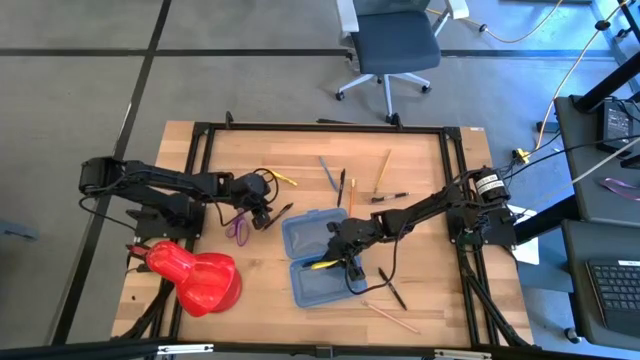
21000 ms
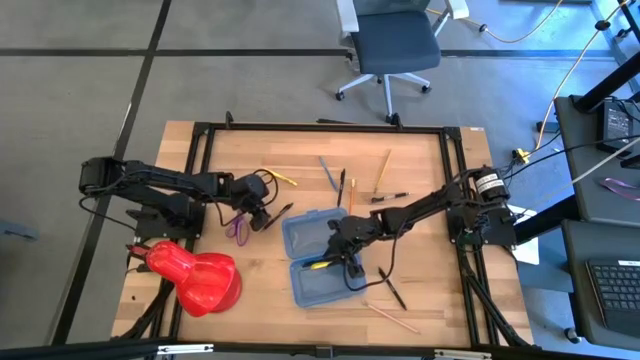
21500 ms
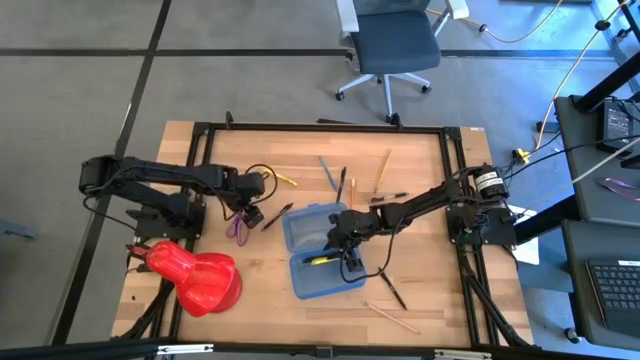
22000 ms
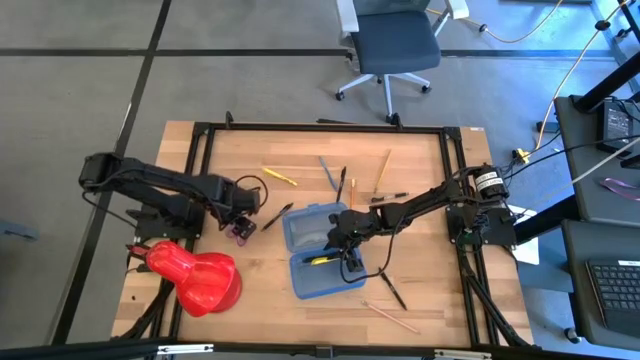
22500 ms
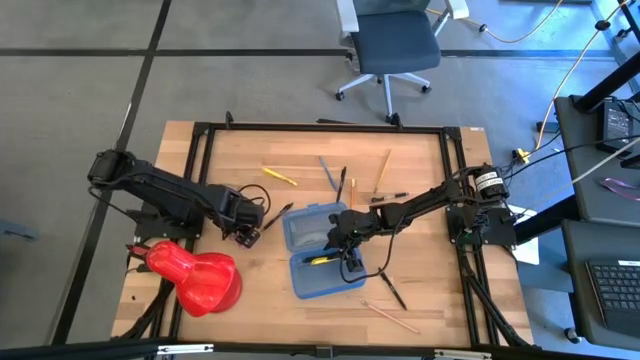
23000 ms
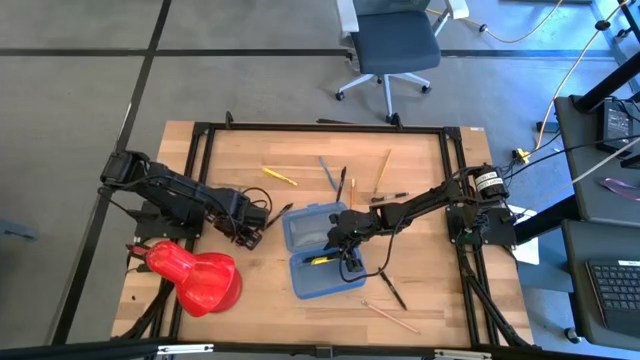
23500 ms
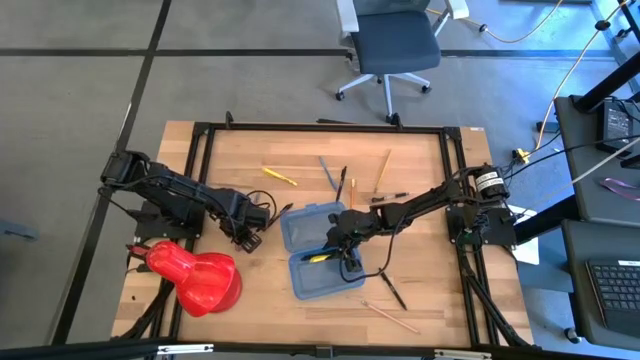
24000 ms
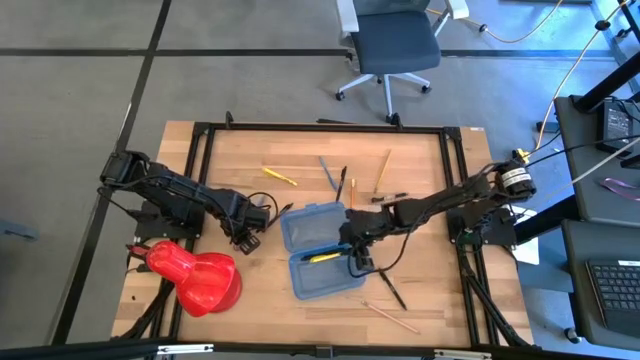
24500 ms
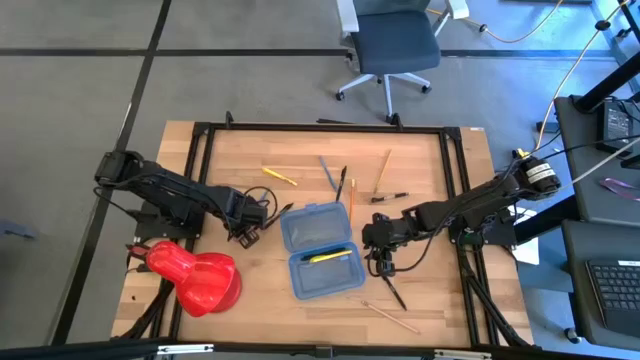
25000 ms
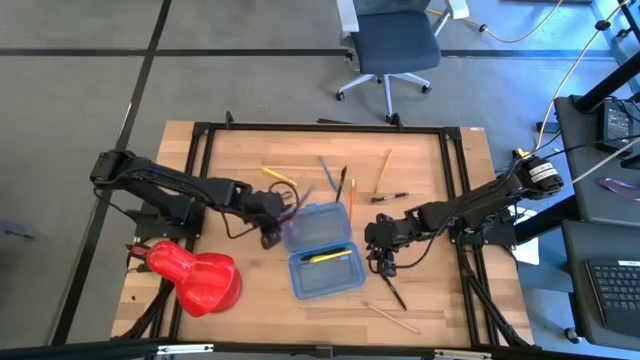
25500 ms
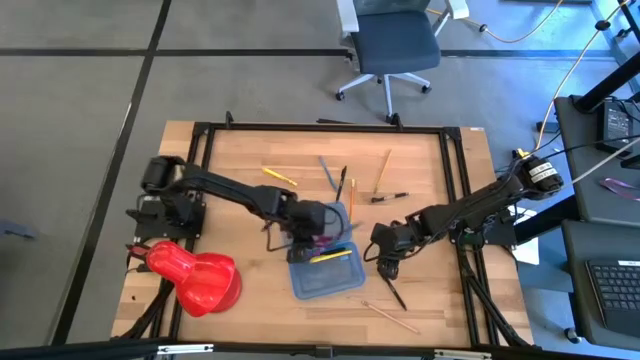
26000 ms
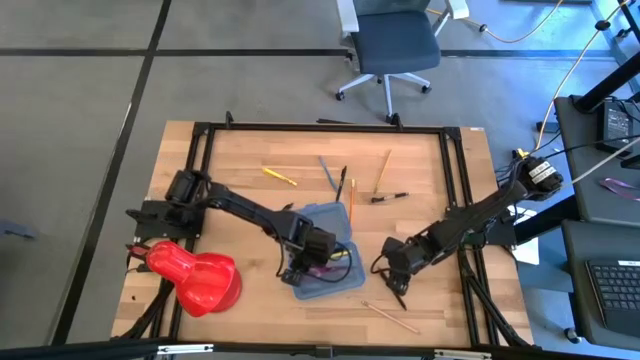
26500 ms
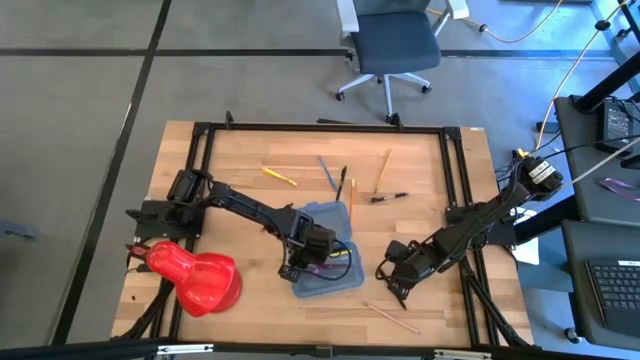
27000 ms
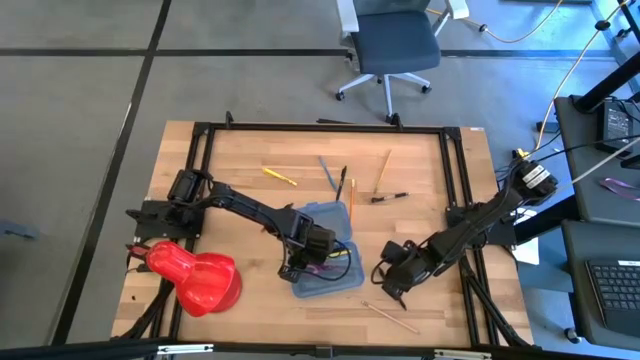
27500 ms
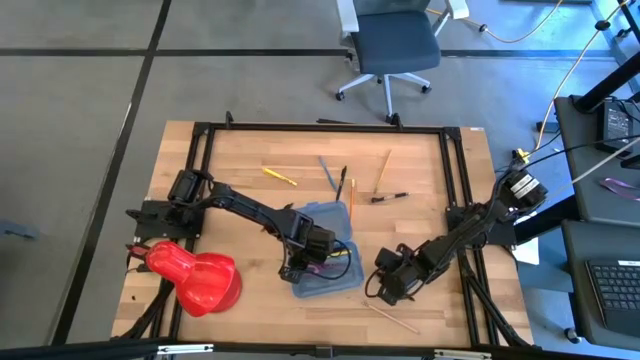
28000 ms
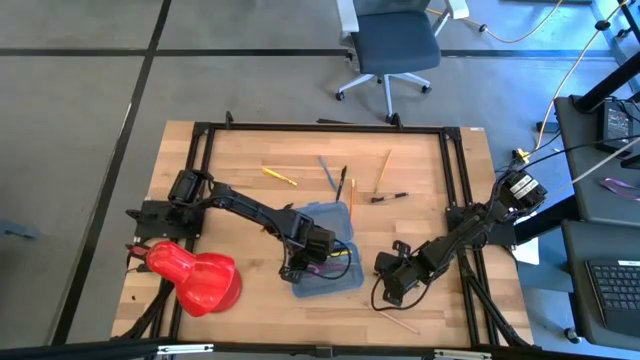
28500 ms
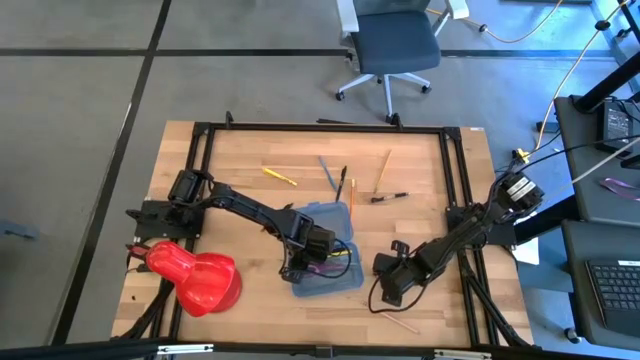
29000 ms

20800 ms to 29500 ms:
Task: Pick & place school supplies into a supply box
Put the scissors into the blue supply box

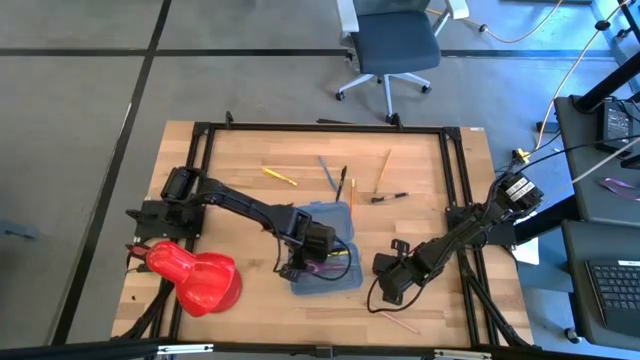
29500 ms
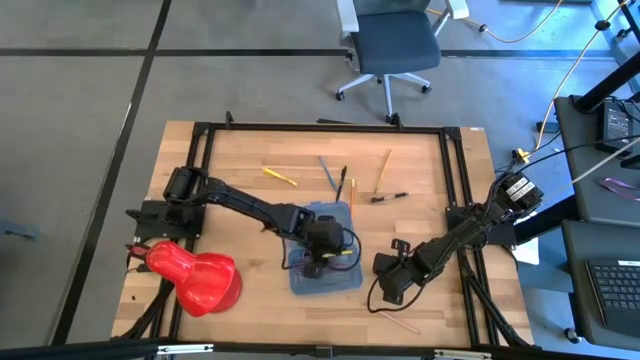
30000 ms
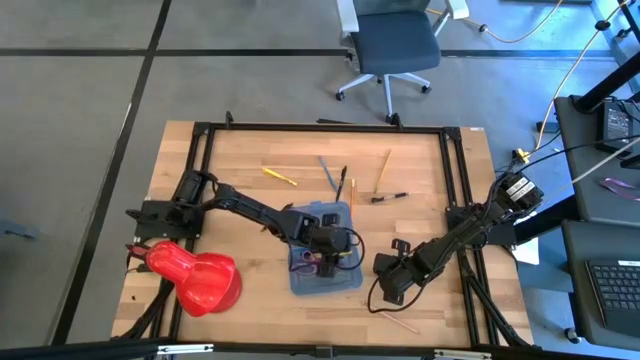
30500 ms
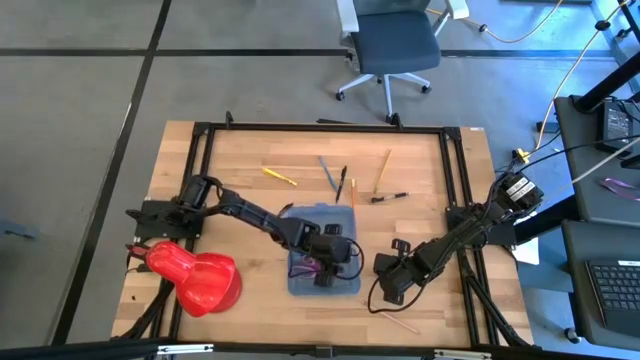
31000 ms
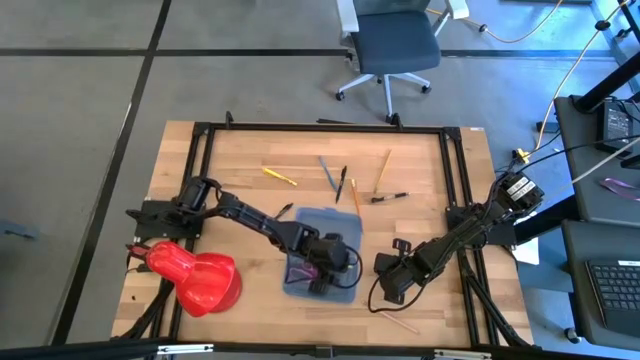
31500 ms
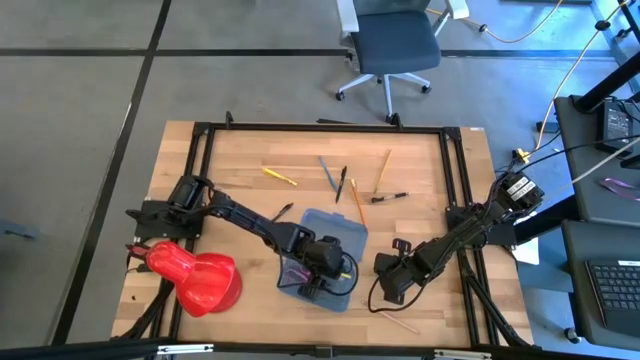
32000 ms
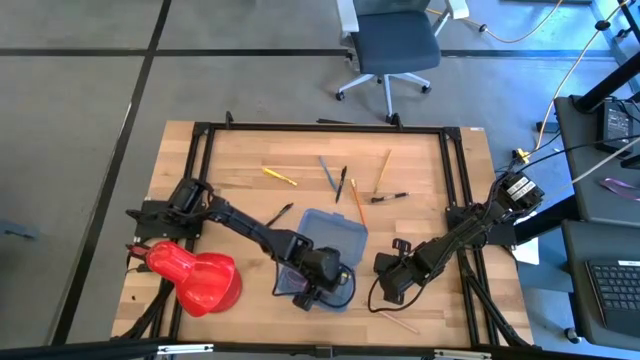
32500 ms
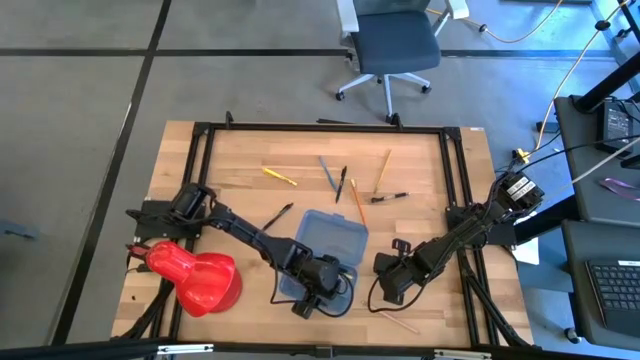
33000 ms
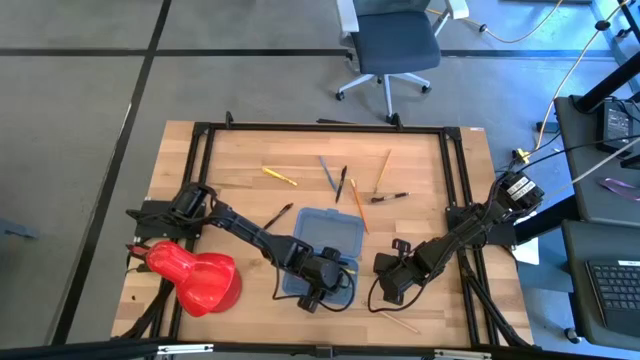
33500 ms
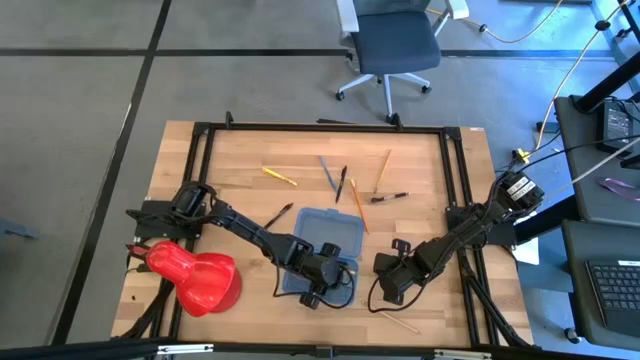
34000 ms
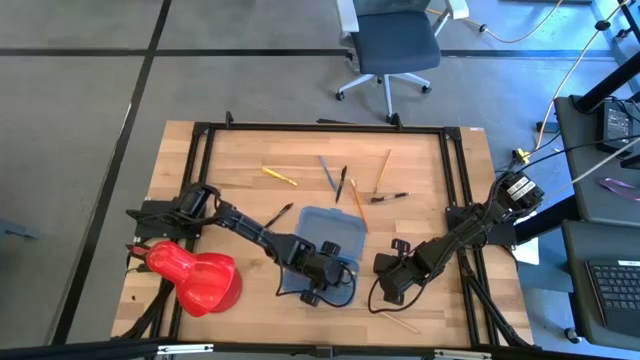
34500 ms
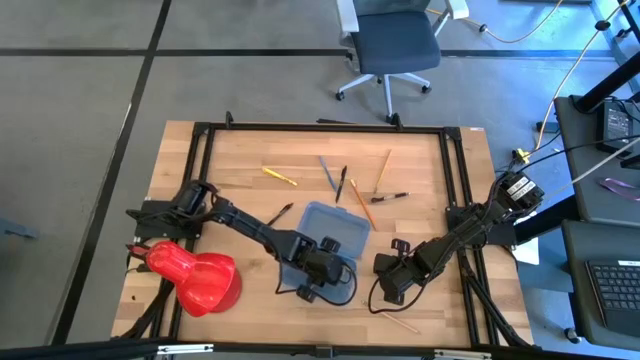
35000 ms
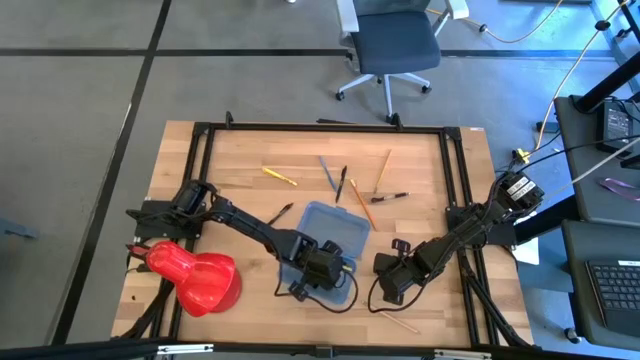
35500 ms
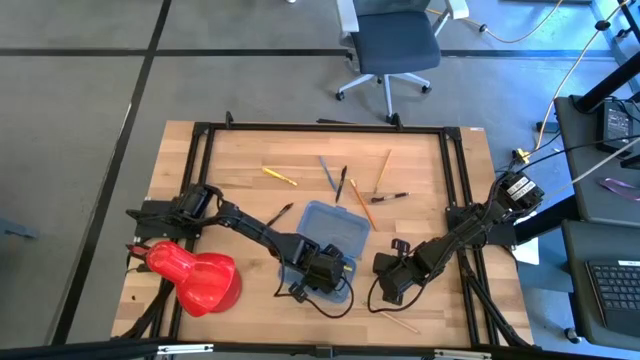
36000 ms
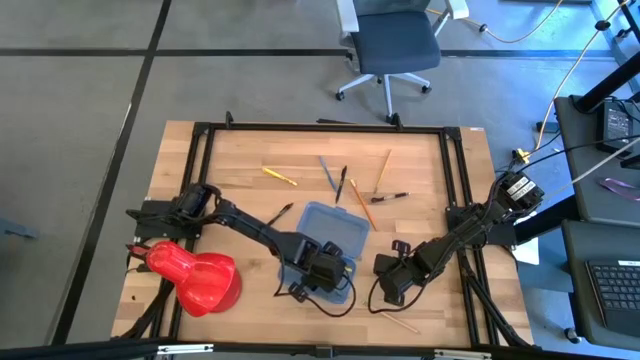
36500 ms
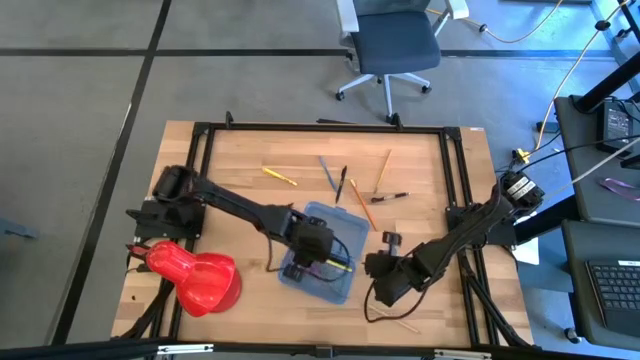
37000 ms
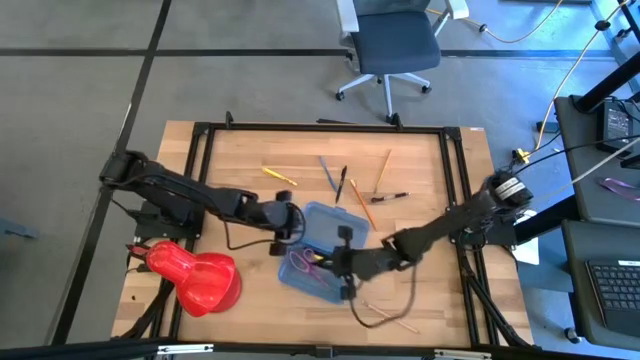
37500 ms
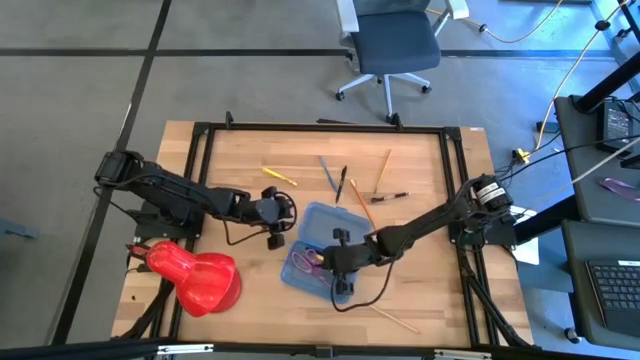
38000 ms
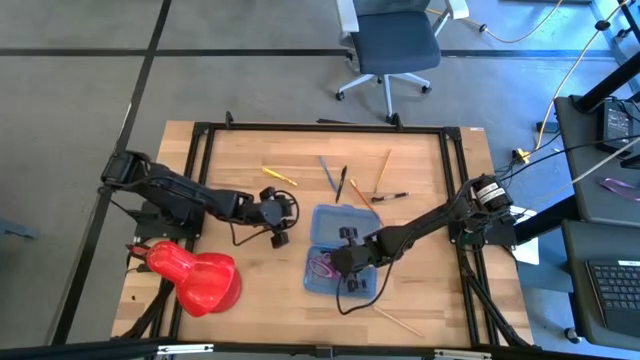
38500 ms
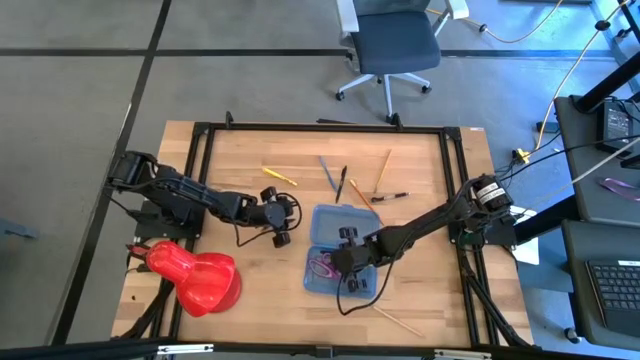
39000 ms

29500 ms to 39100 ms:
Put the bottom right black pen into the blue supply box

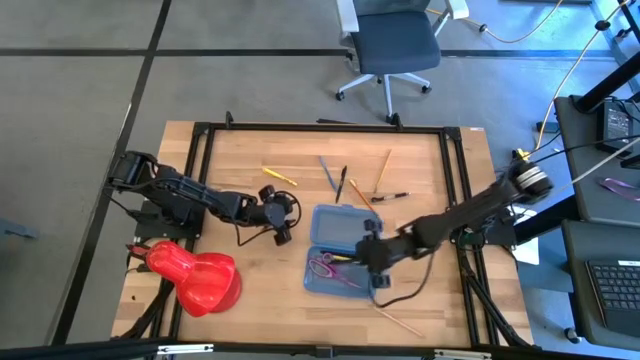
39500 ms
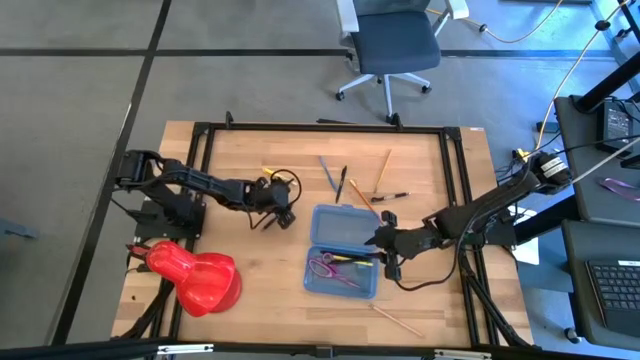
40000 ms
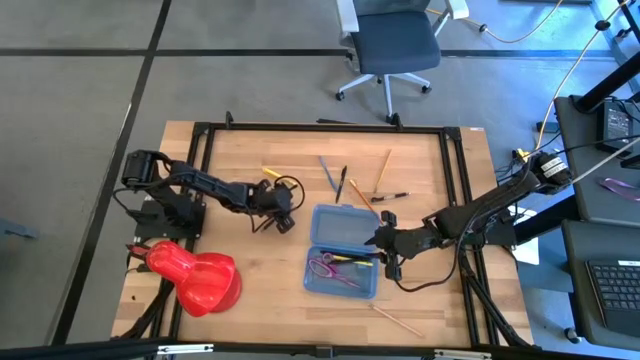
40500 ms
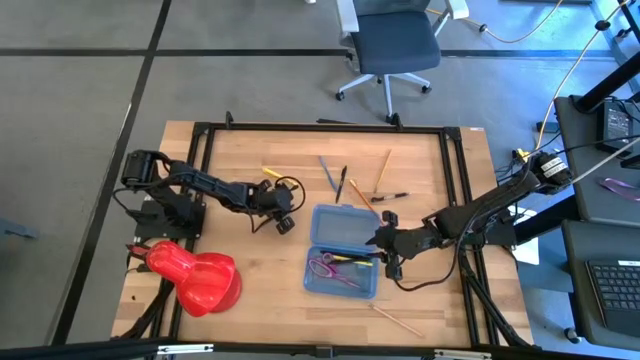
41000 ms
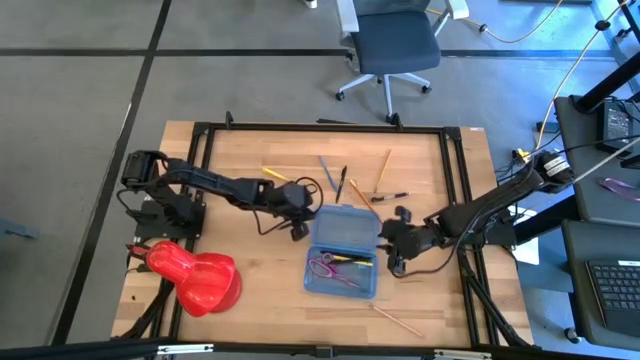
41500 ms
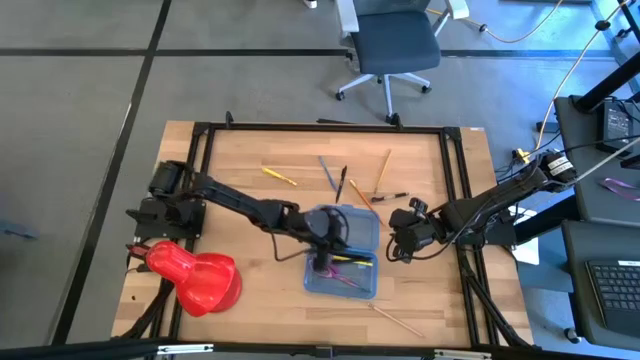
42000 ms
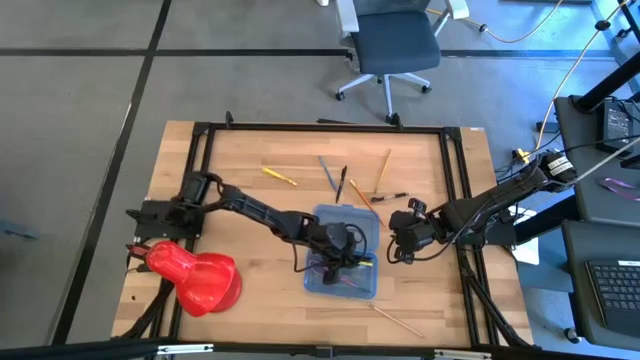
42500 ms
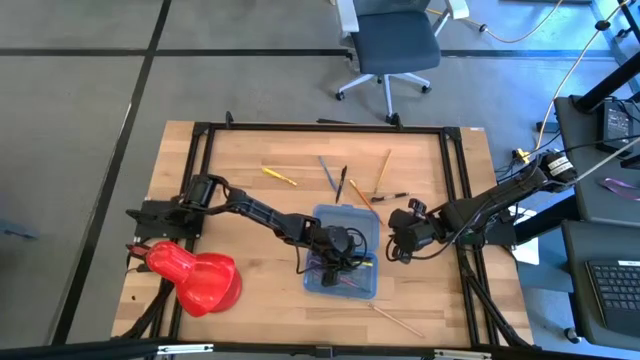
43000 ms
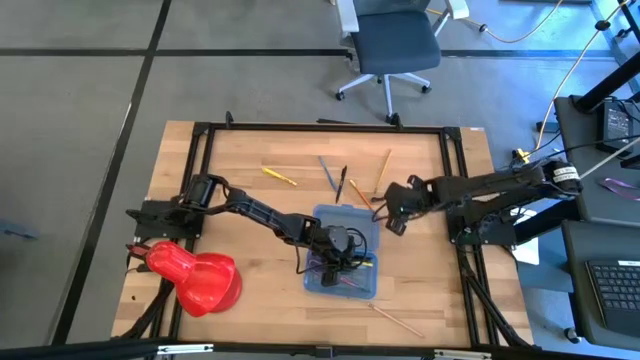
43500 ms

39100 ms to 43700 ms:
Put the middle left black pen into the blue supply box
